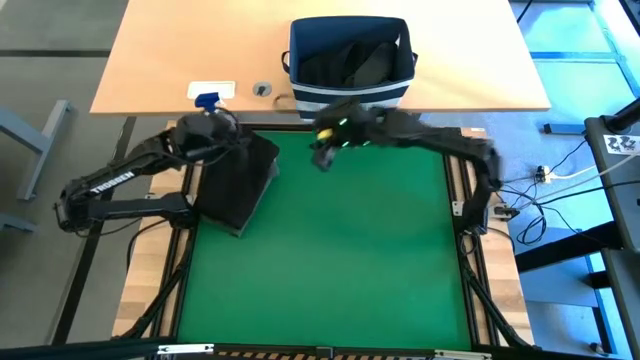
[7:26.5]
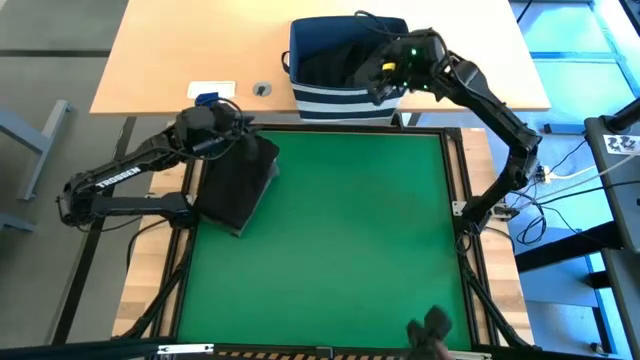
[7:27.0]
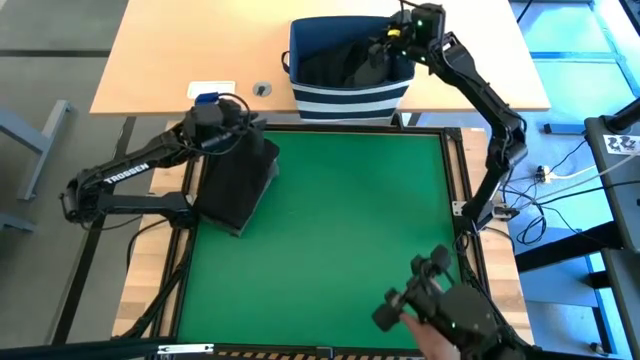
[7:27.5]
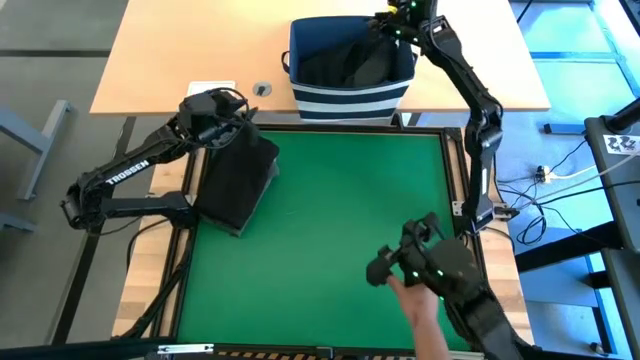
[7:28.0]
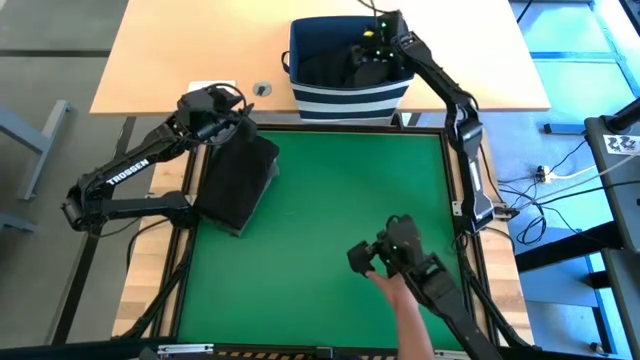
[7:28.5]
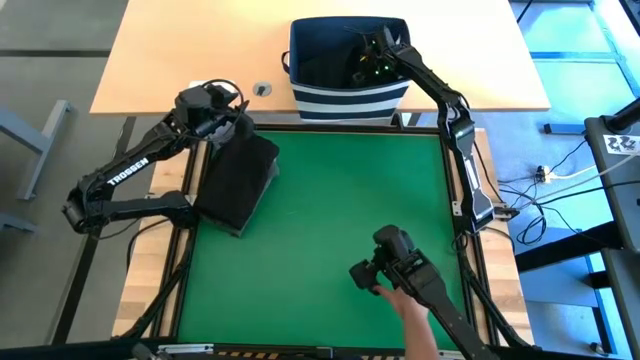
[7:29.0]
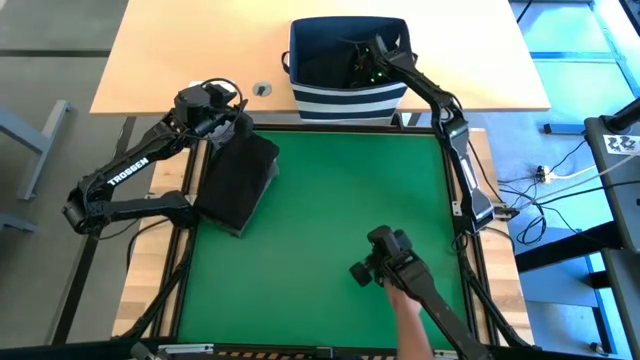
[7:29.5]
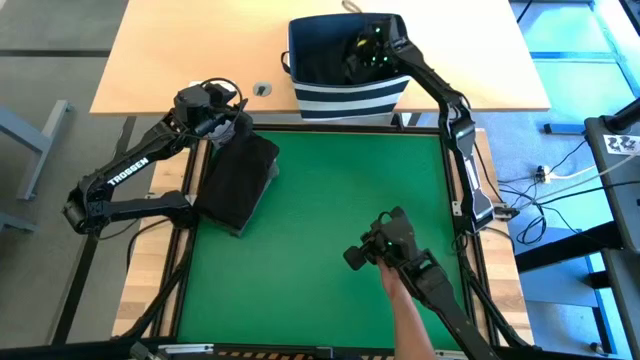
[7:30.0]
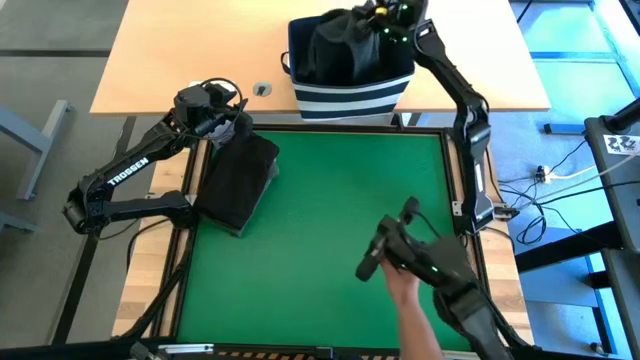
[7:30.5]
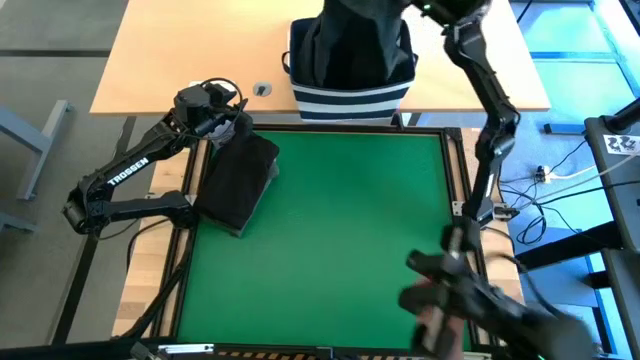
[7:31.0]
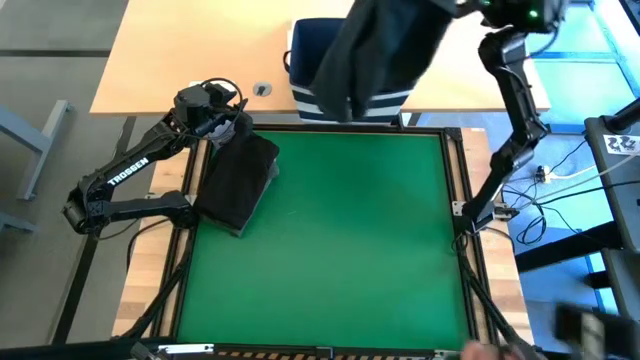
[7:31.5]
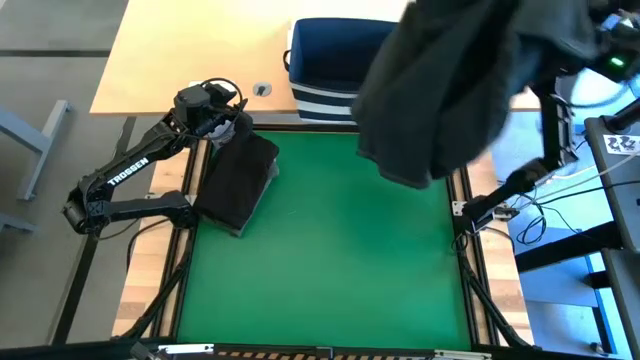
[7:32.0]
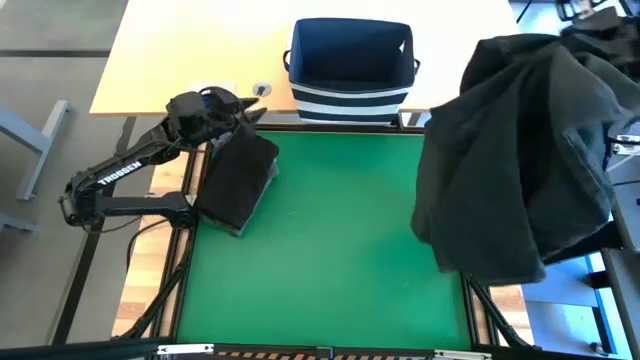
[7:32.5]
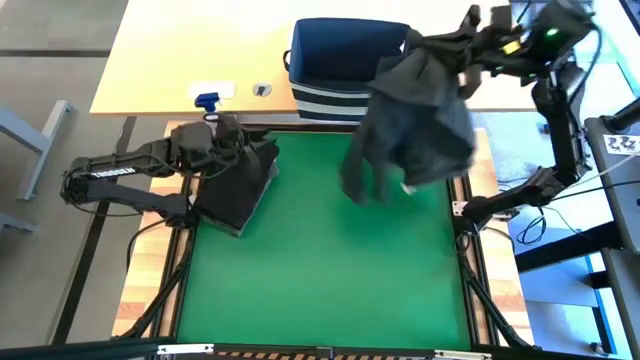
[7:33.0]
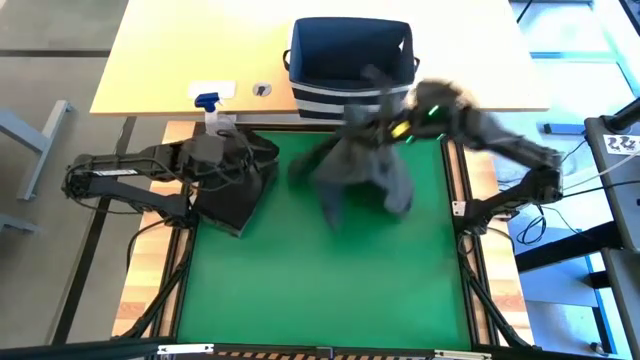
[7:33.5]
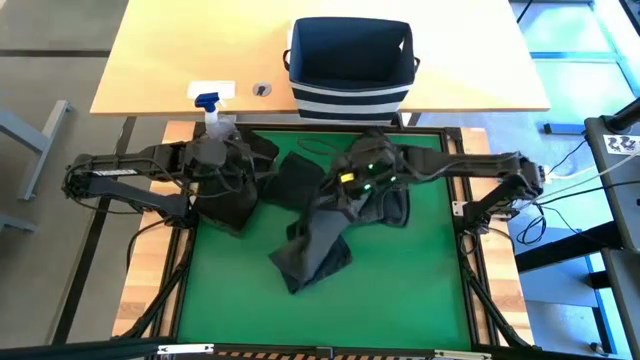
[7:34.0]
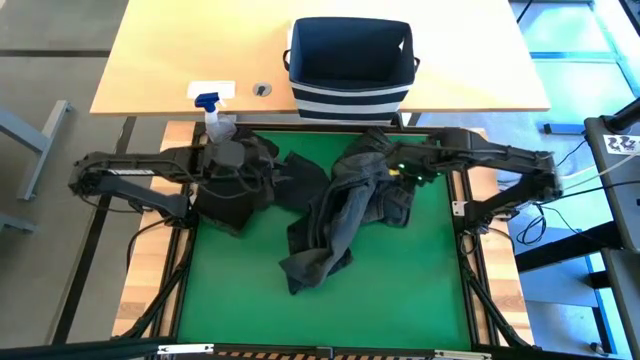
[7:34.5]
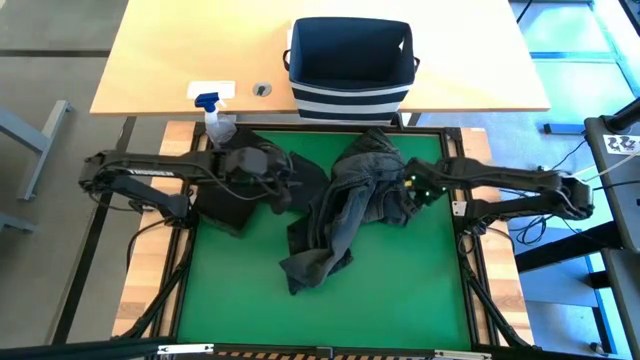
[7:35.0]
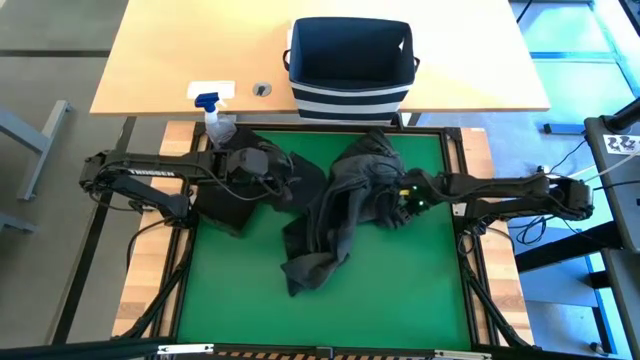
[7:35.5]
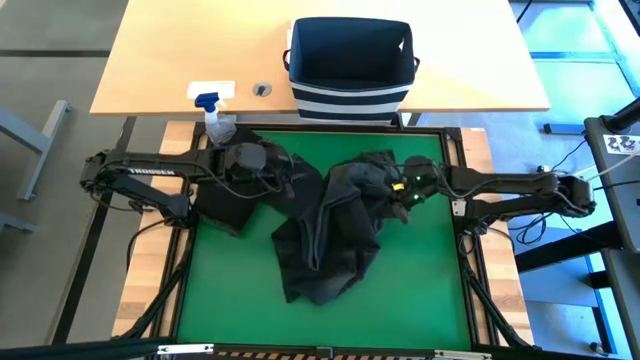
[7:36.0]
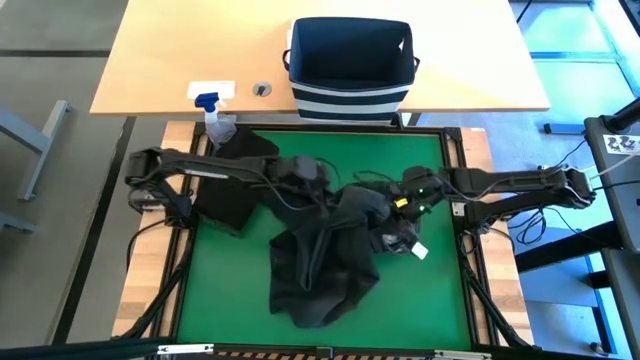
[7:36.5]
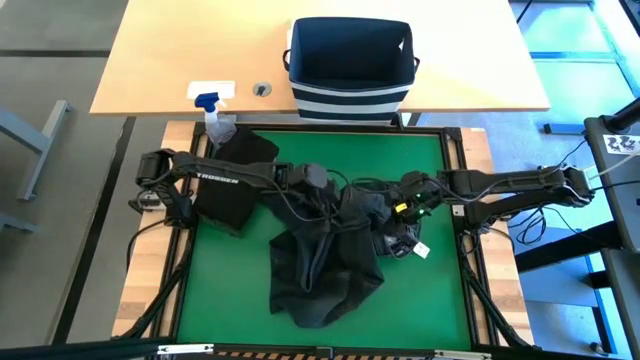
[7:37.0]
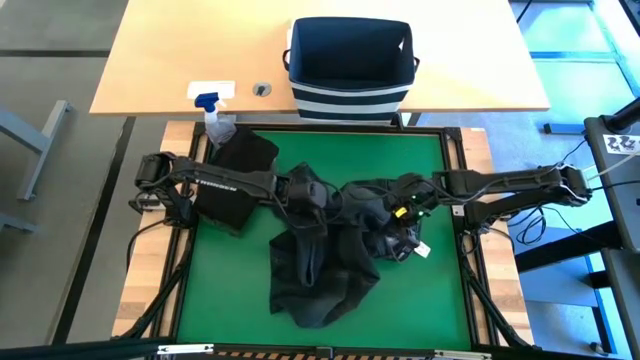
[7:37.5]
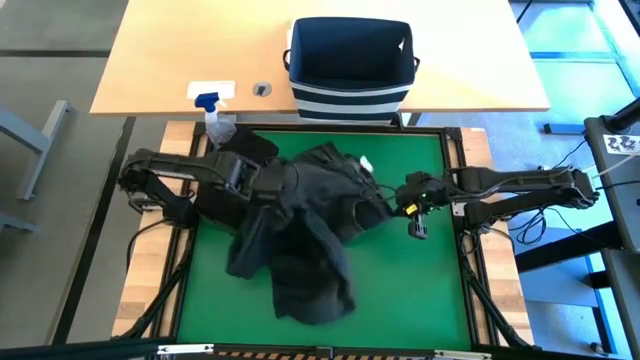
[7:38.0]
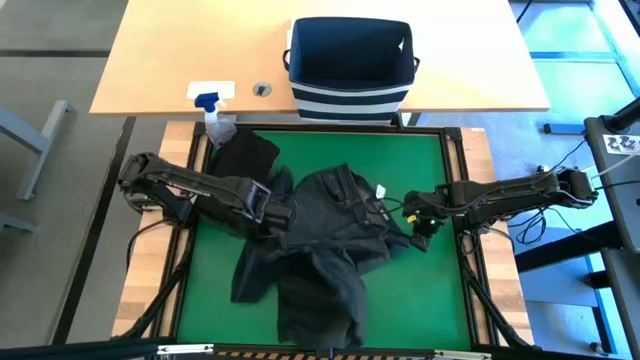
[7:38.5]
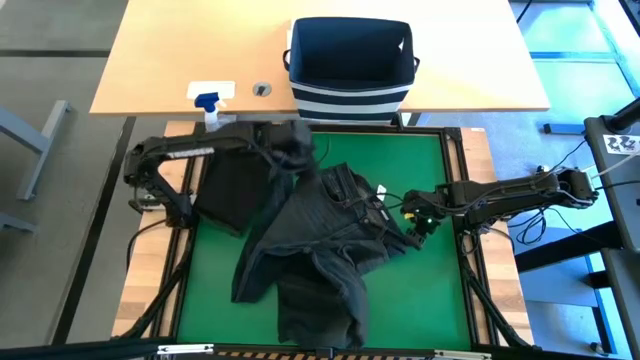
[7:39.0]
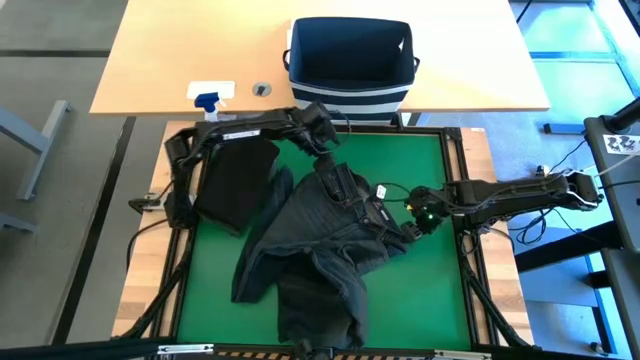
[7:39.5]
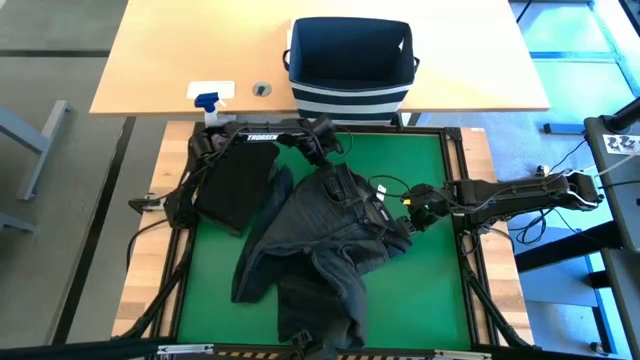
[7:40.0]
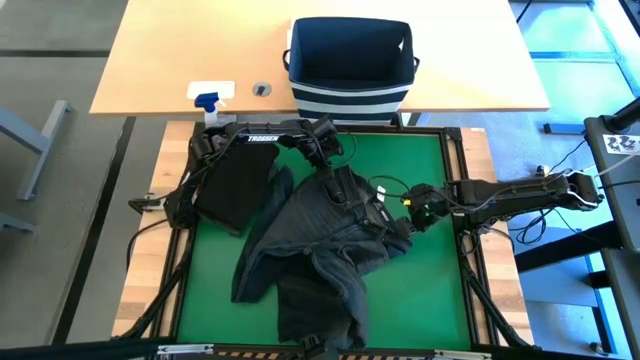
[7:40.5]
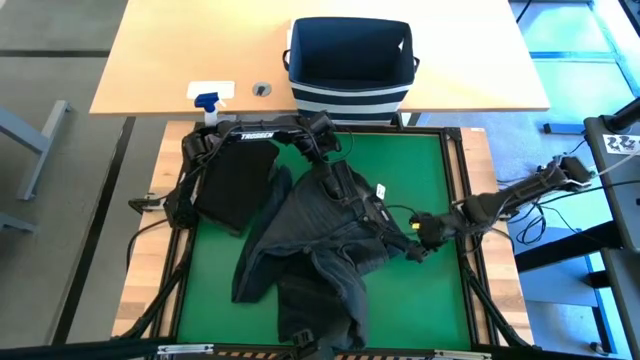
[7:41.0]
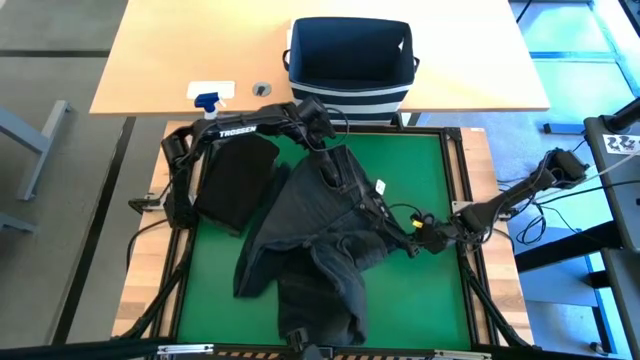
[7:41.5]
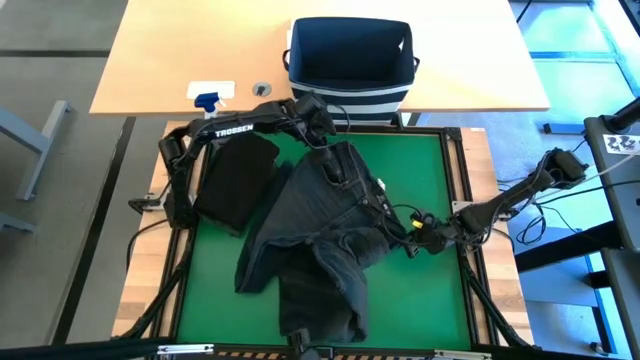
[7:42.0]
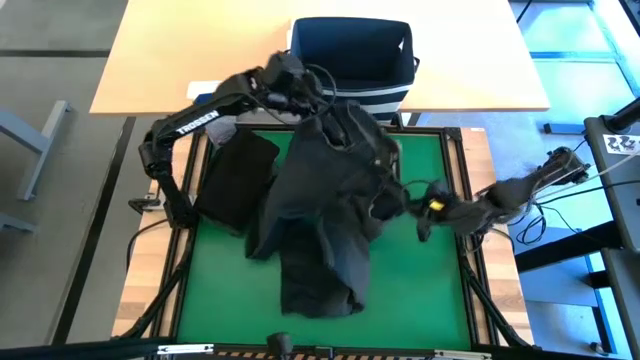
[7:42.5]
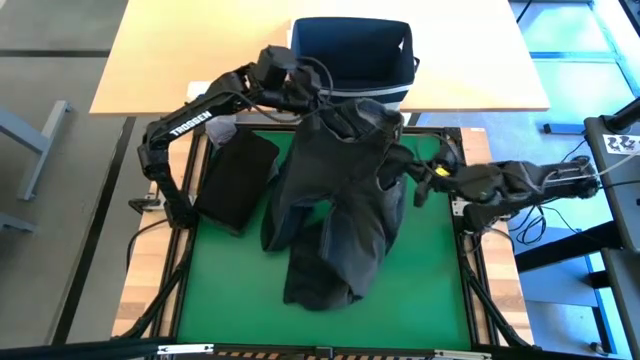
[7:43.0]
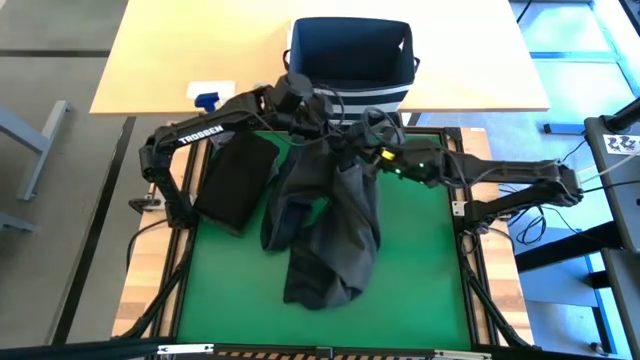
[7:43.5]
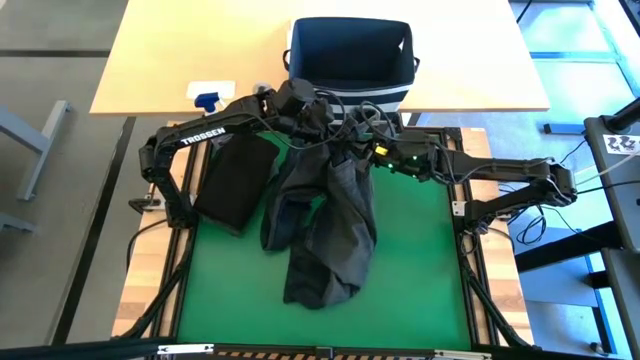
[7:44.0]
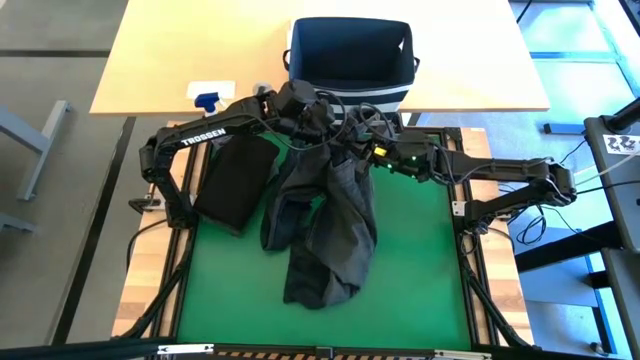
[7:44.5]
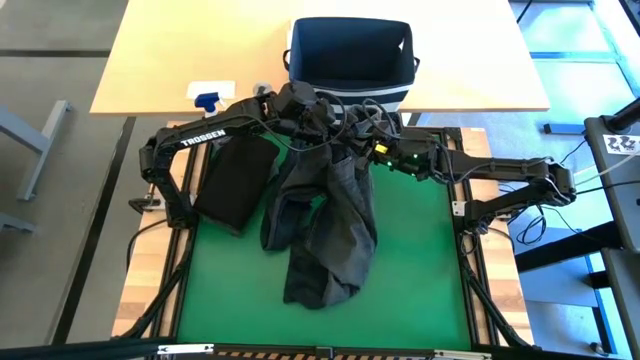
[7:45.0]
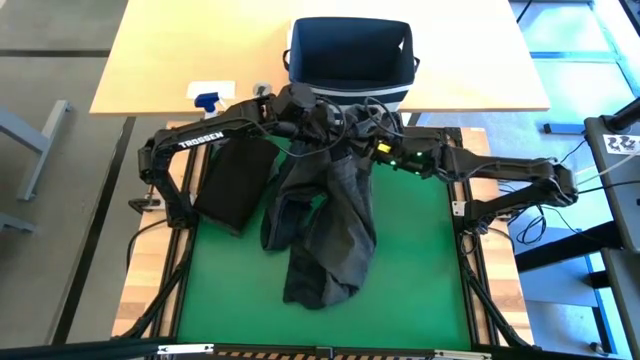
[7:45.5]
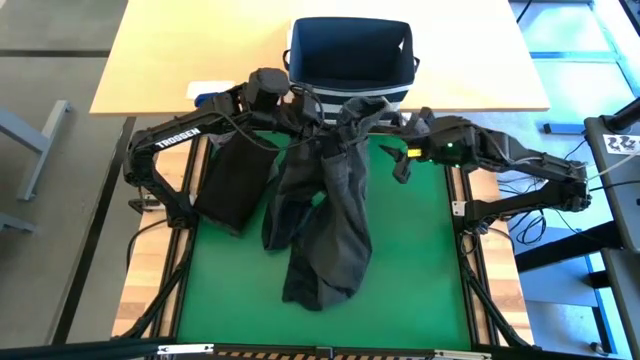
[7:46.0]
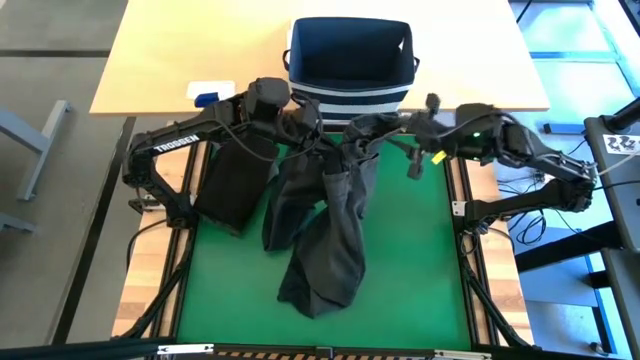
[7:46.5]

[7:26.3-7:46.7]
Task: Fold Laundry from Bin
Fold the blue pants

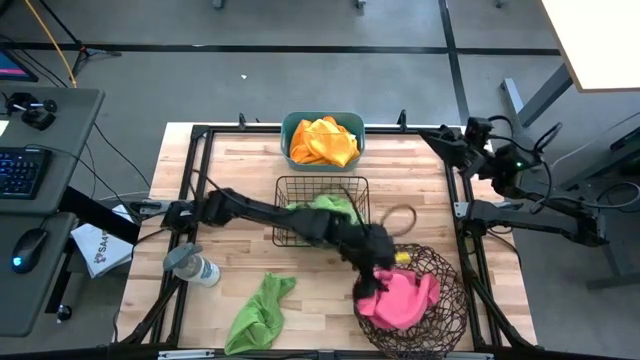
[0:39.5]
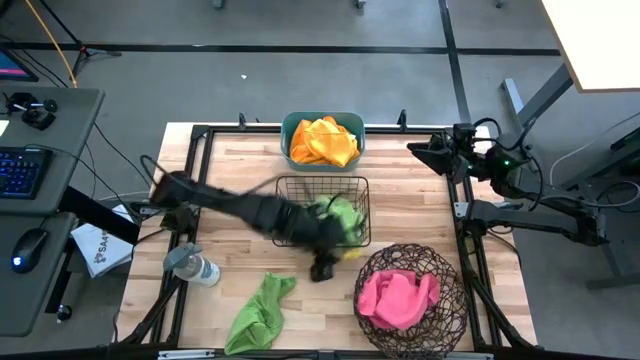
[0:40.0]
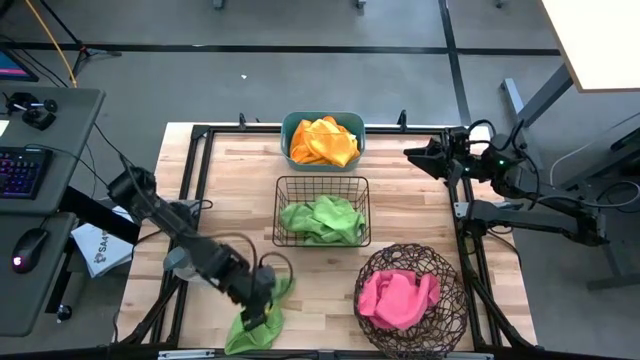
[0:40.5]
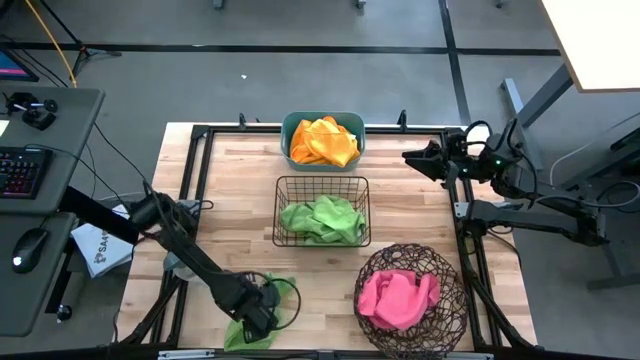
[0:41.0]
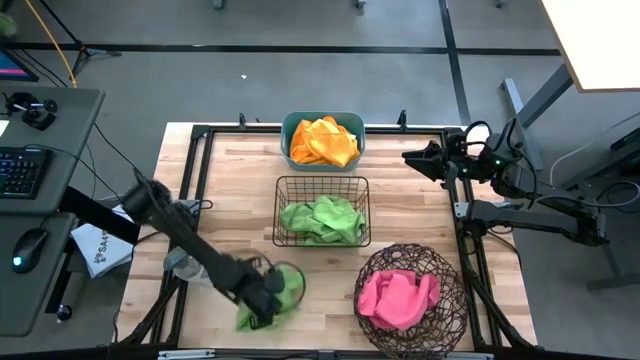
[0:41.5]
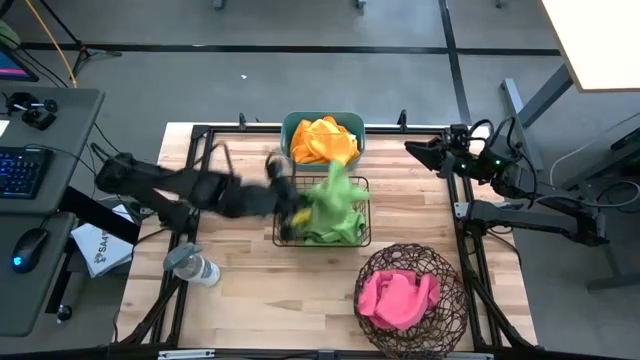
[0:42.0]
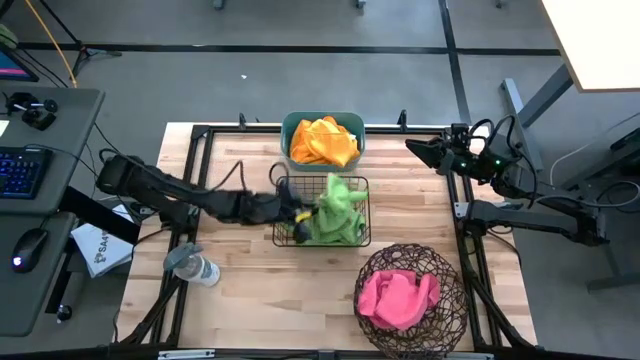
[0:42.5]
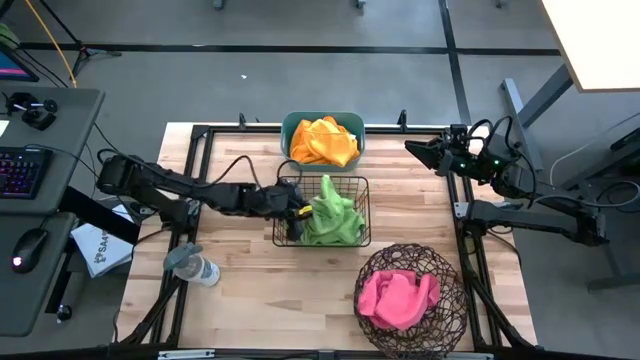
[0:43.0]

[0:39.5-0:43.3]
Task: Sort microfiber towel by color & place in baskets
Put the green microfiber cloth into the black wire basket
